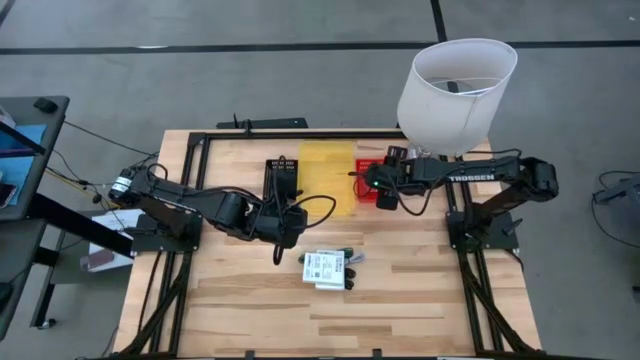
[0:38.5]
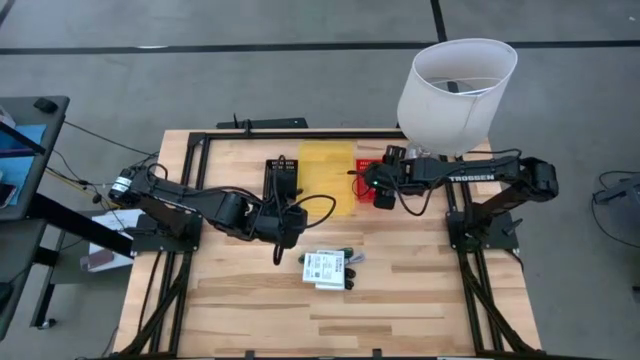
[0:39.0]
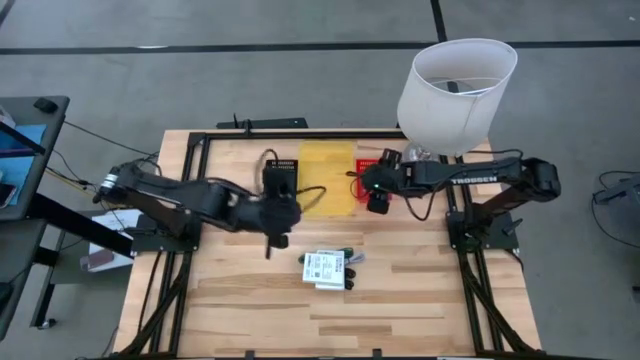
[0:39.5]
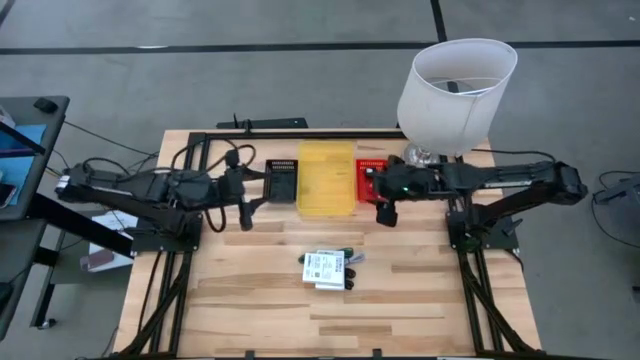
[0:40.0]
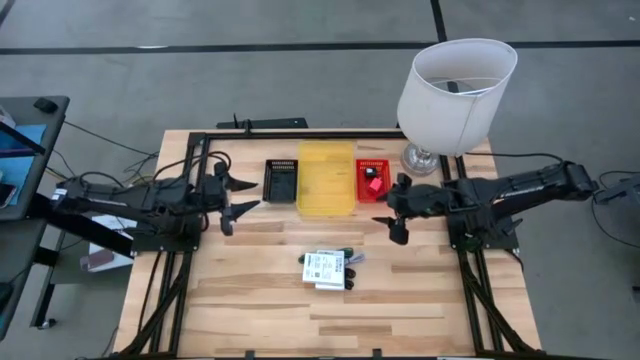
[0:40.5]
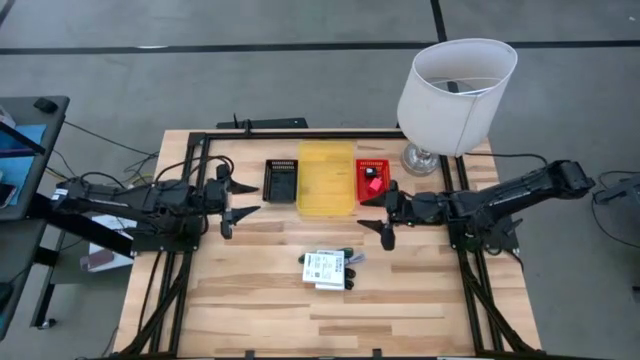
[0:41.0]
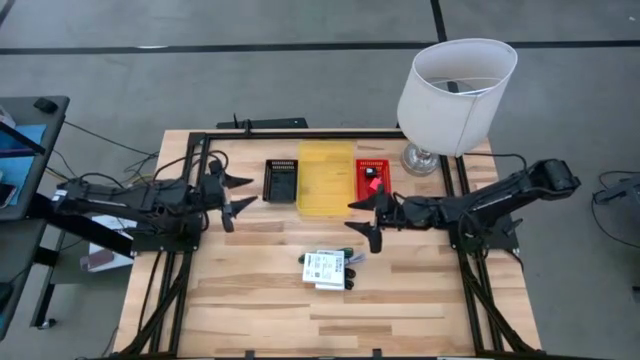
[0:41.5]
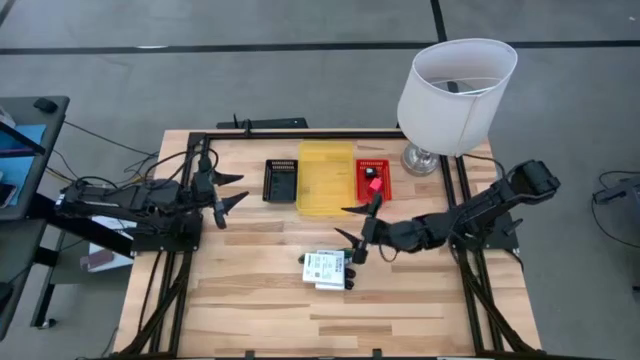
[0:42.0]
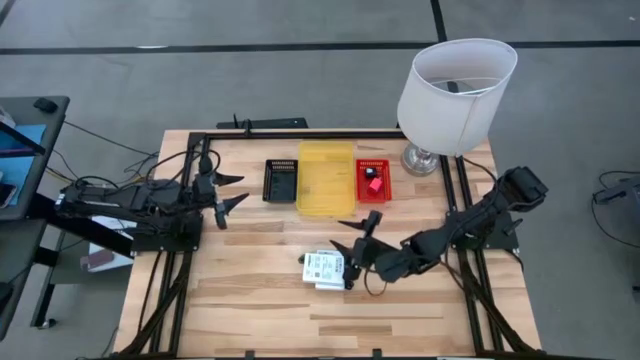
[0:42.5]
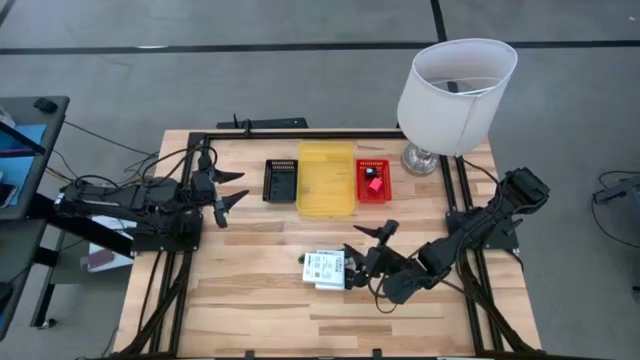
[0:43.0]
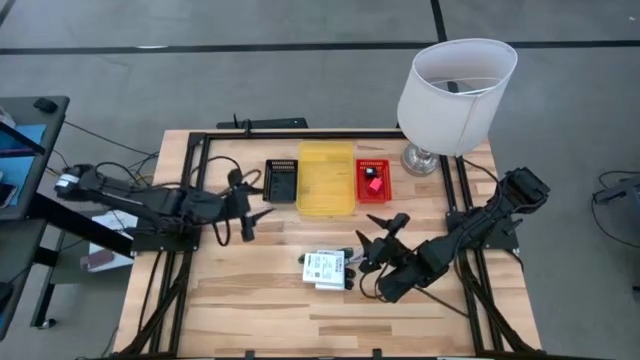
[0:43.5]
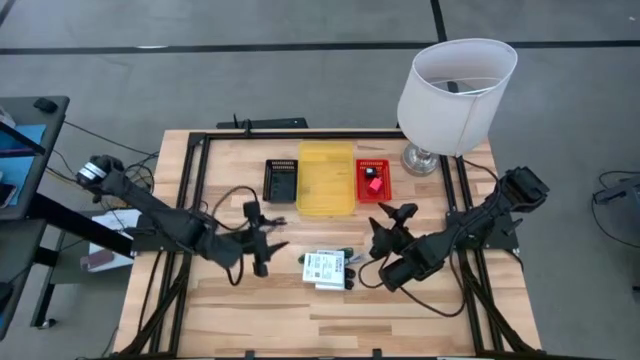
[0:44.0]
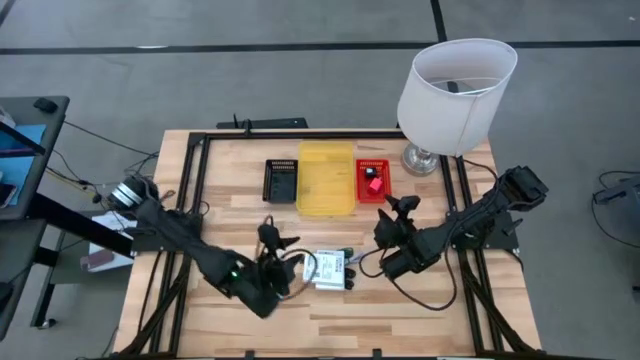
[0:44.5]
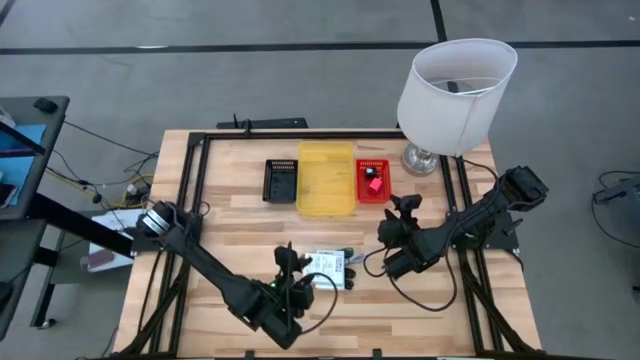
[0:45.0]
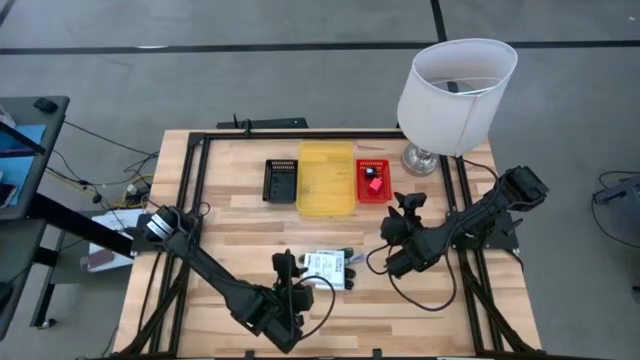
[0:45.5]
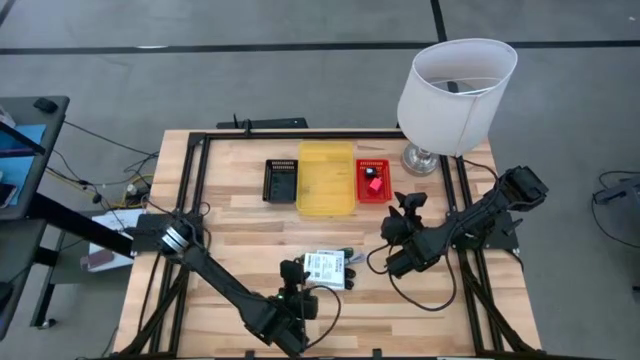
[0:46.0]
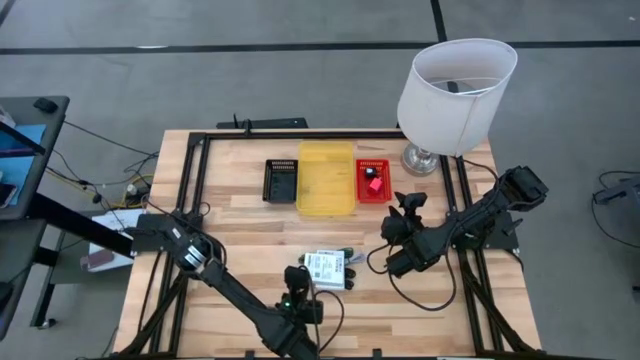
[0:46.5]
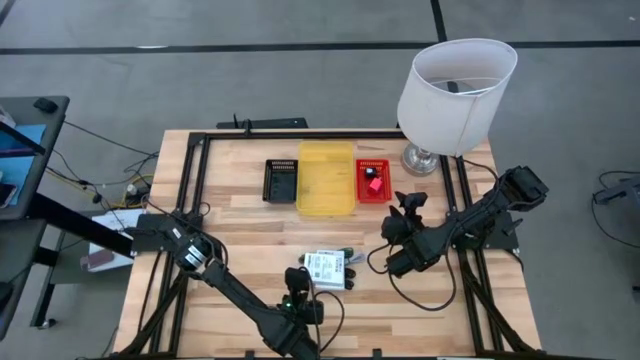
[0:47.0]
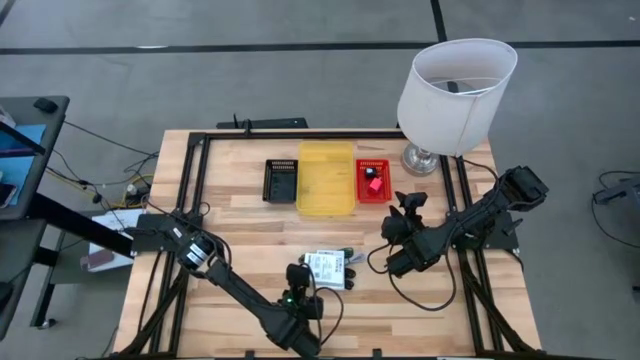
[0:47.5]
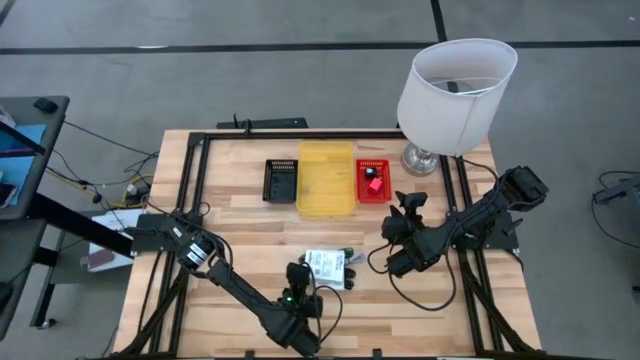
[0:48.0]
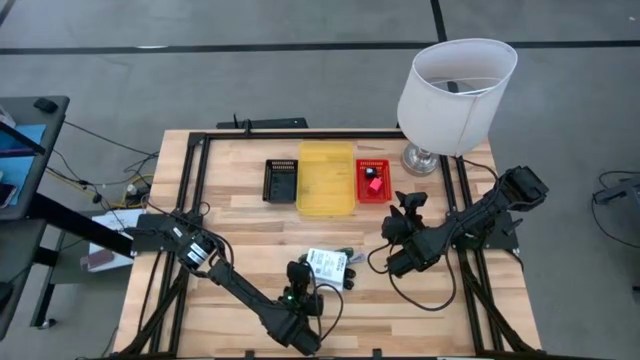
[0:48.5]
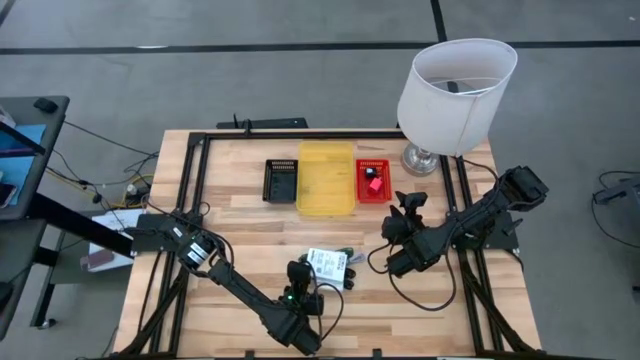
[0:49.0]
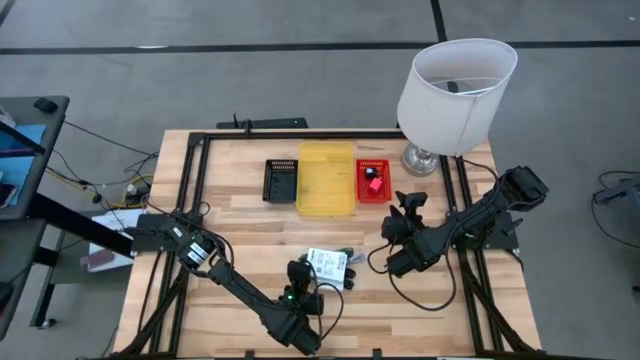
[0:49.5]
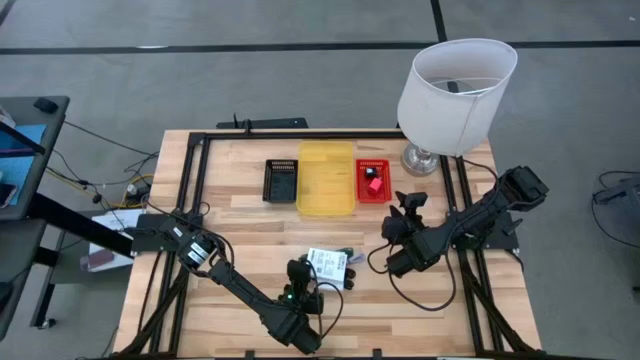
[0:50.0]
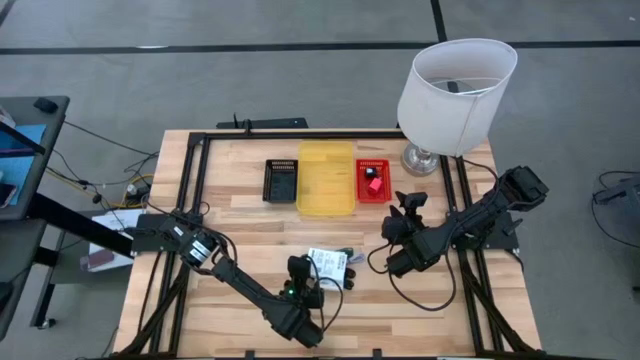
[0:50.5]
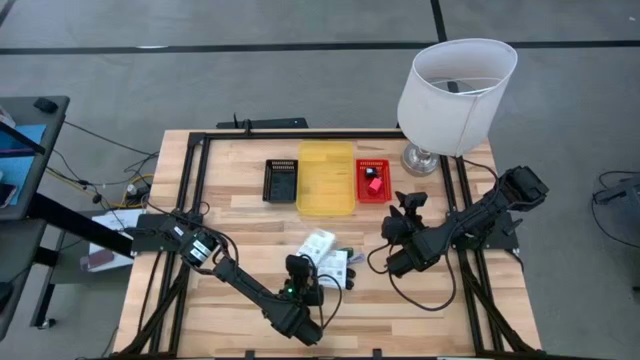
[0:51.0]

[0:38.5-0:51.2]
Task: Pick and place items into bin
Put the top card reader box into the black bin

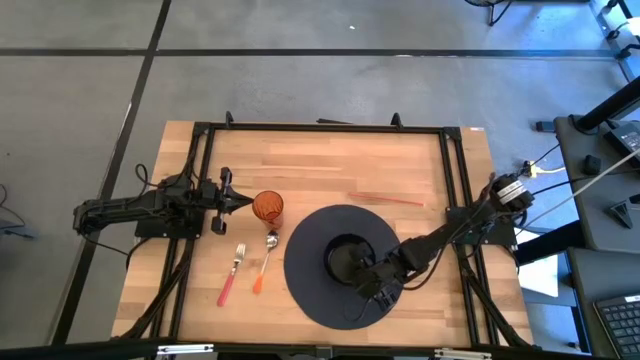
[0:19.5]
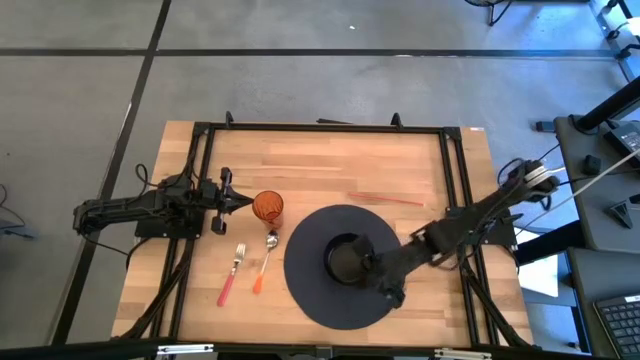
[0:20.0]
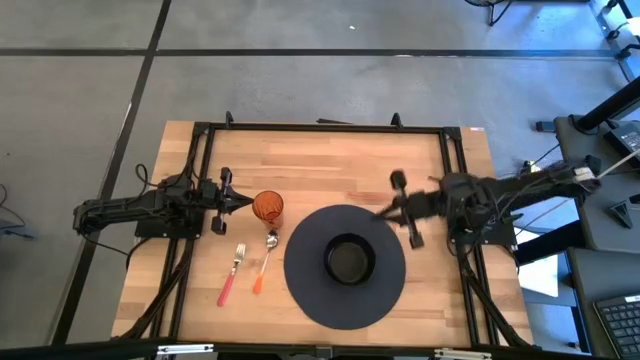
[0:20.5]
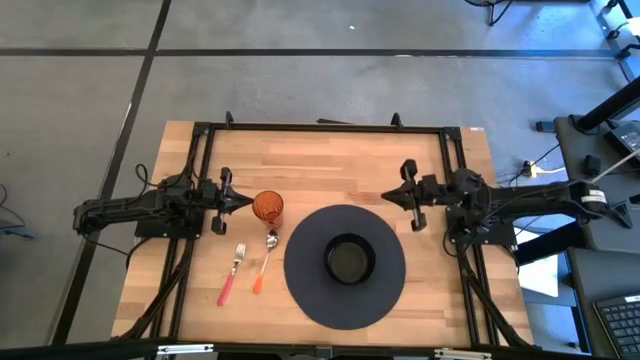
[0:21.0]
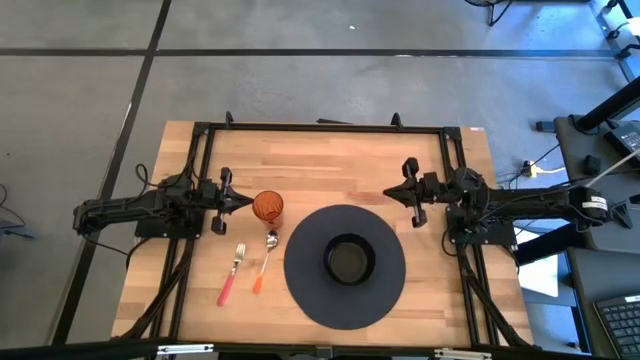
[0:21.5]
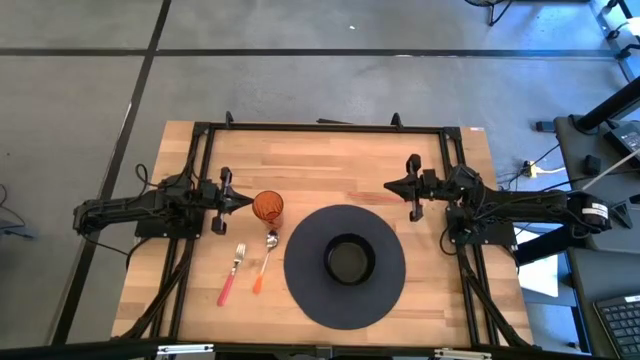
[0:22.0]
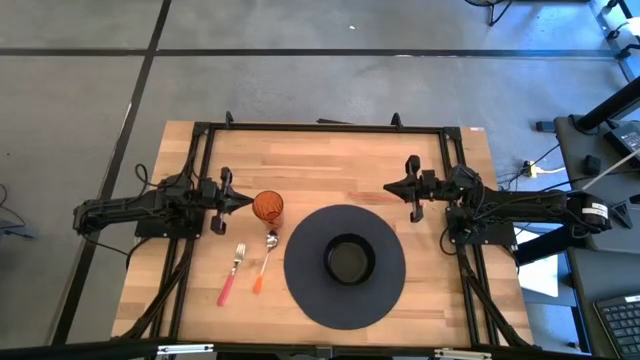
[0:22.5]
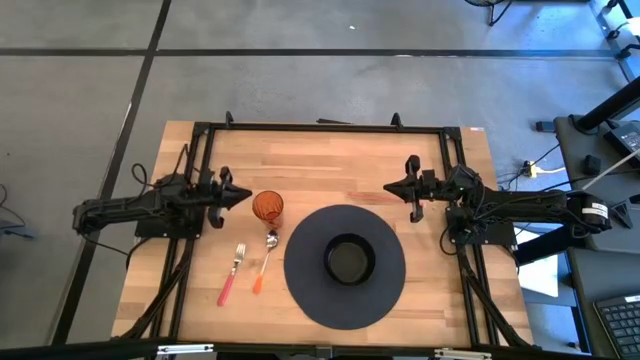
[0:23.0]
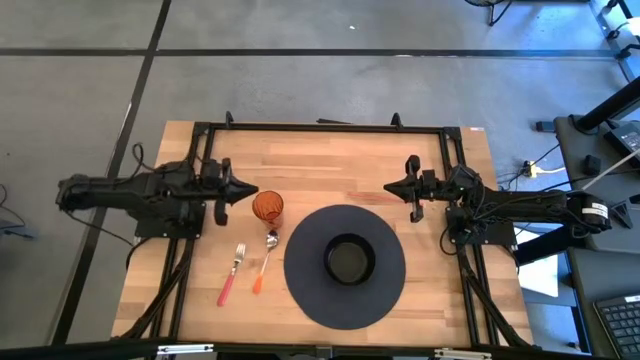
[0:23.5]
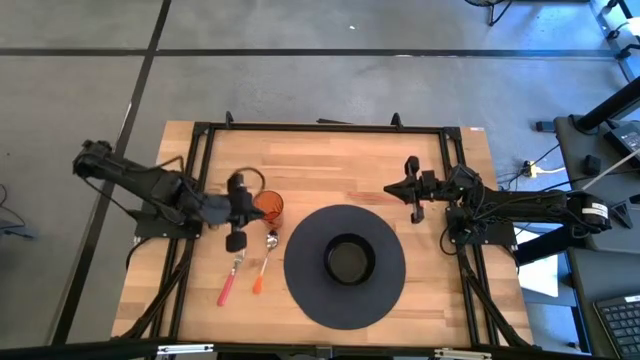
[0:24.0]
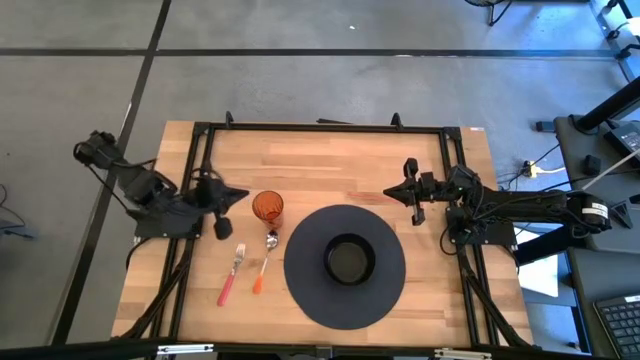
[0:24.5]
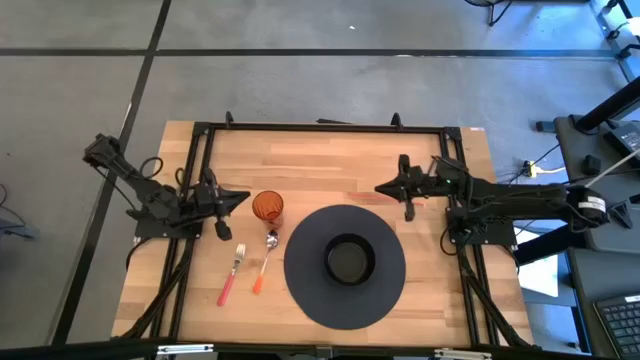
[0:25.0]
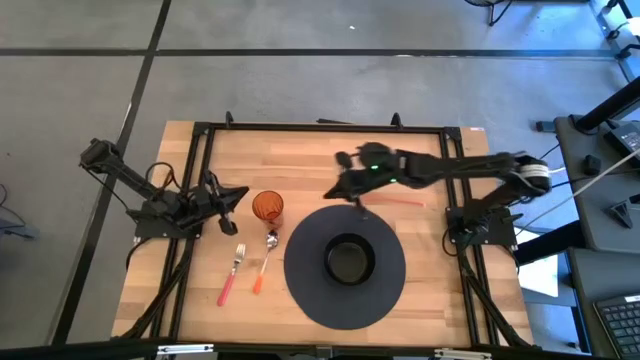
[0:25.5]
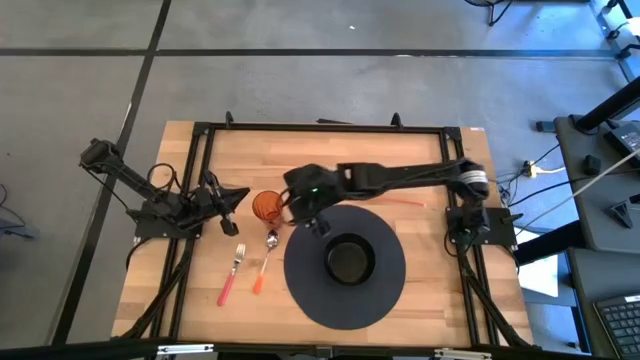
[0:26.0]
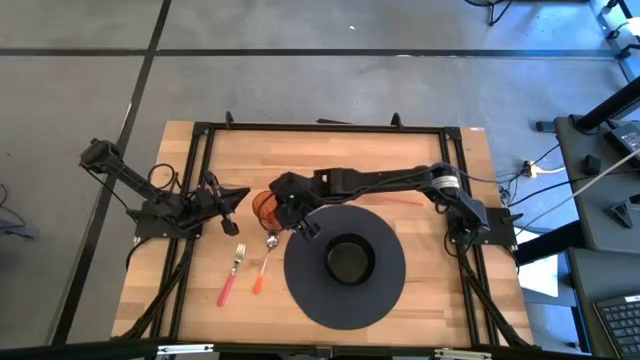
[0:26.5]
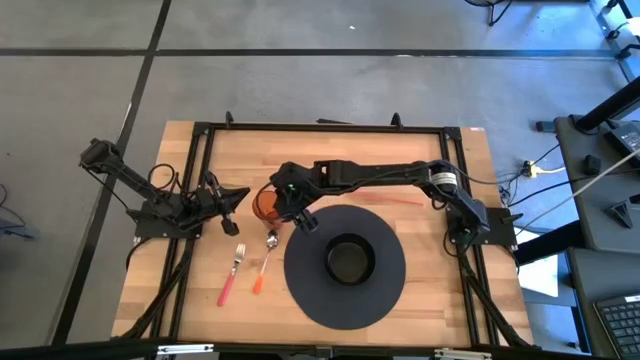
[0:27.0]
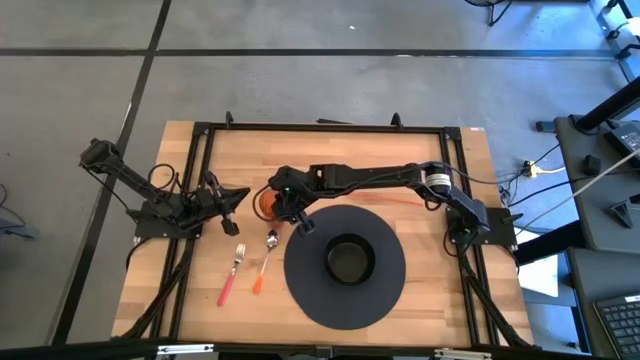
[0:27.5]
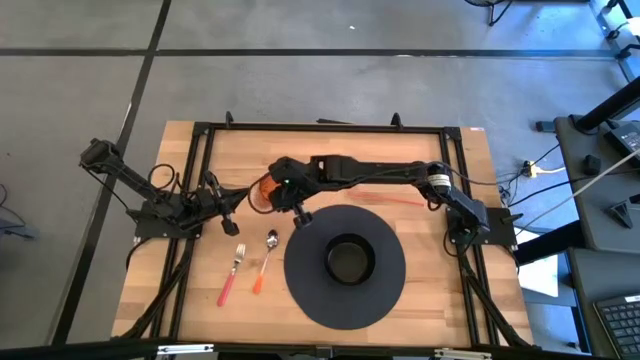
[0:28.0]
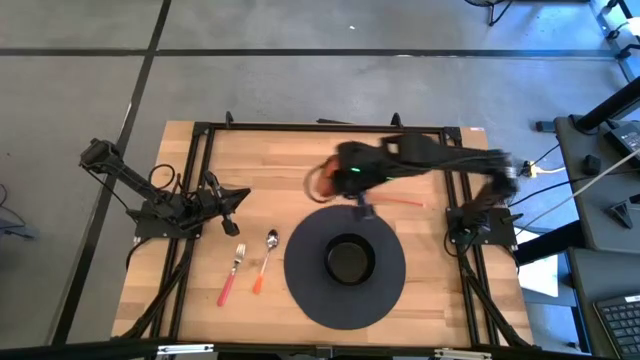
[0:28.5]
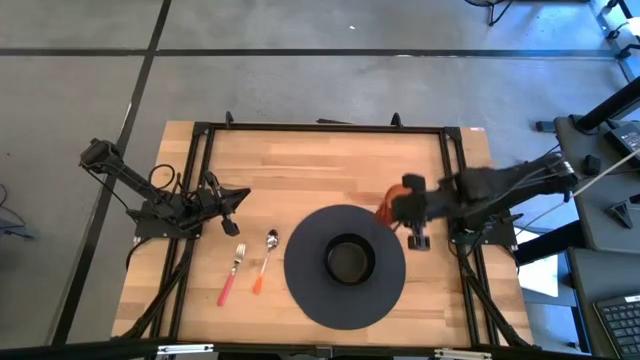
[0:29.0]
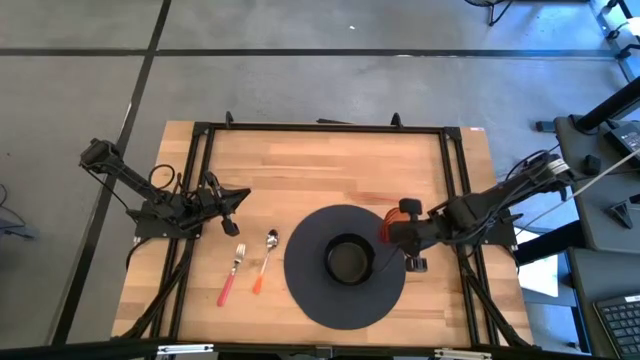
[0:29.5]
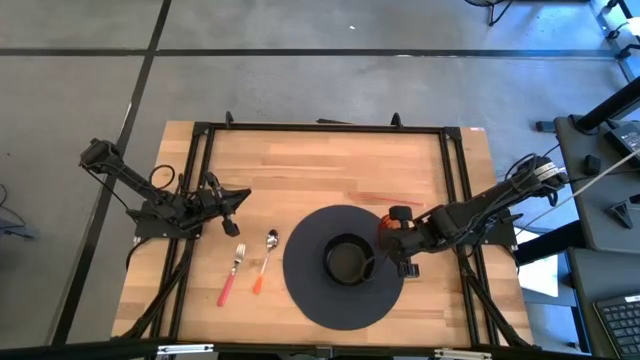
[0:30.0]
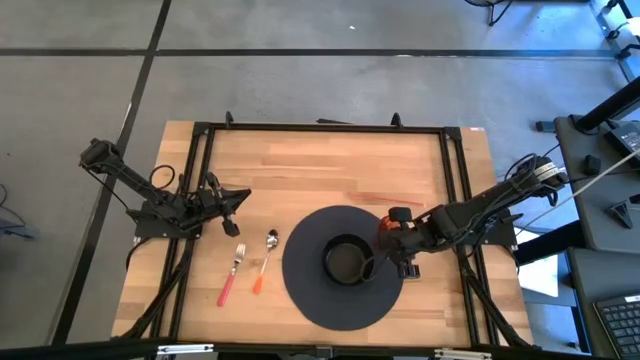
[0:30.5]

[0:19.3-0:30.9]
Task: Pick & Place Utensil
Put the orange cup on the dark mat to the top right of the black bowl
